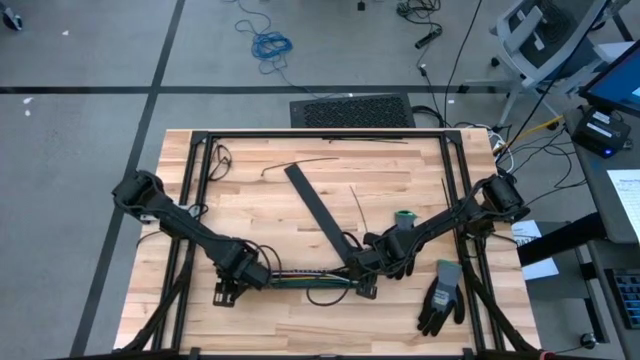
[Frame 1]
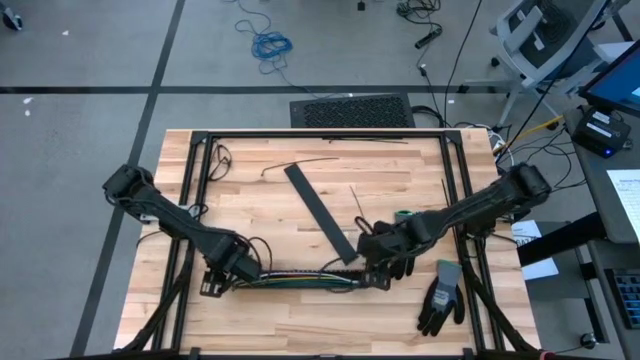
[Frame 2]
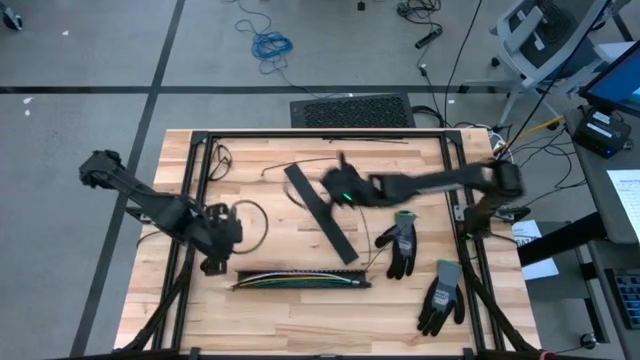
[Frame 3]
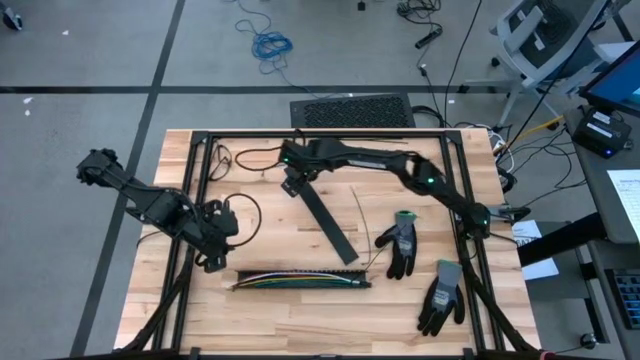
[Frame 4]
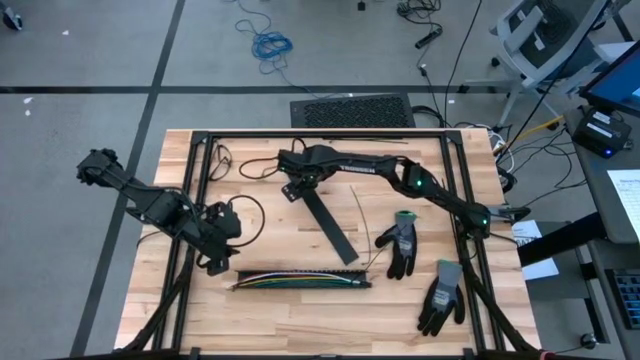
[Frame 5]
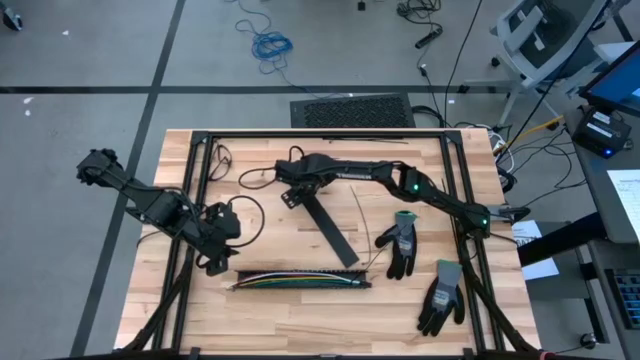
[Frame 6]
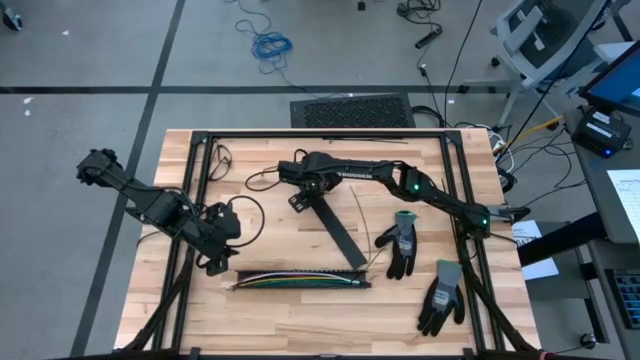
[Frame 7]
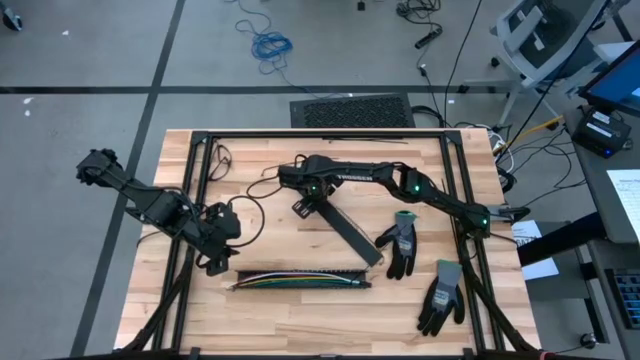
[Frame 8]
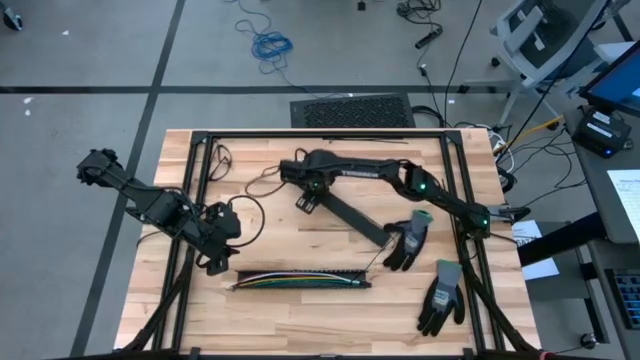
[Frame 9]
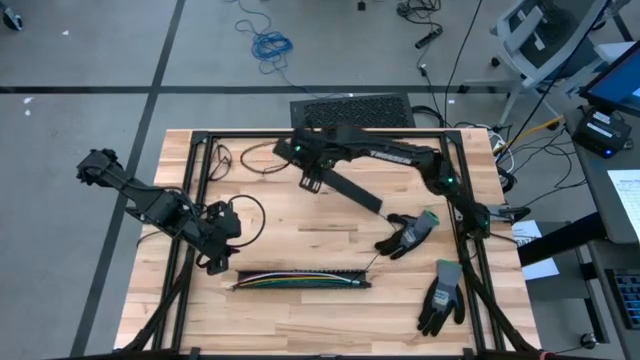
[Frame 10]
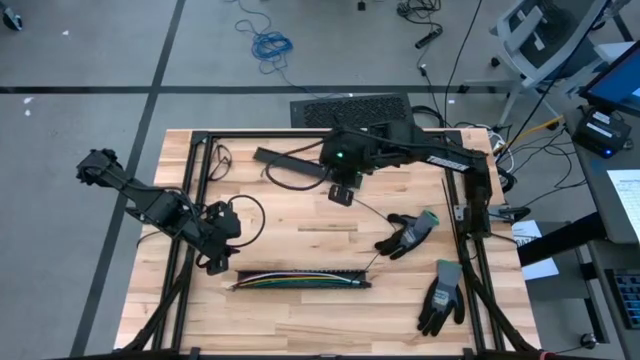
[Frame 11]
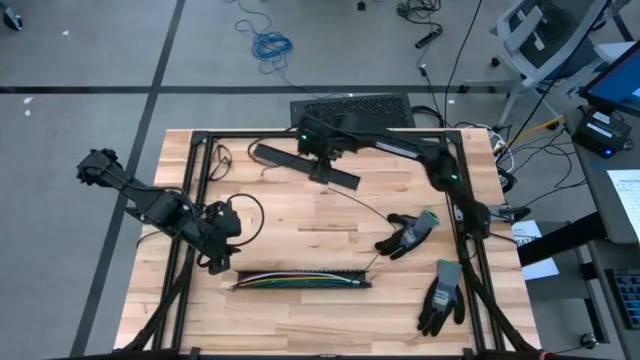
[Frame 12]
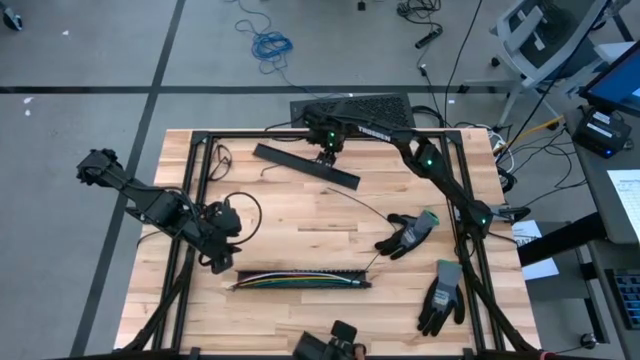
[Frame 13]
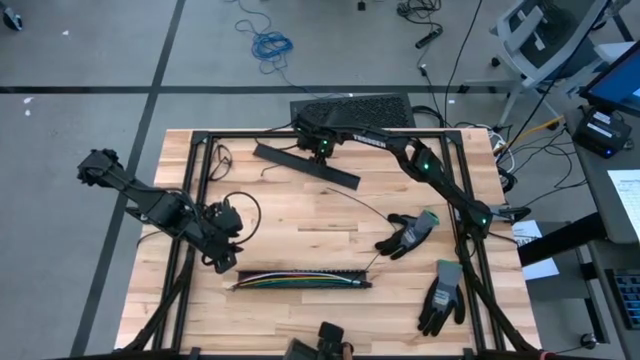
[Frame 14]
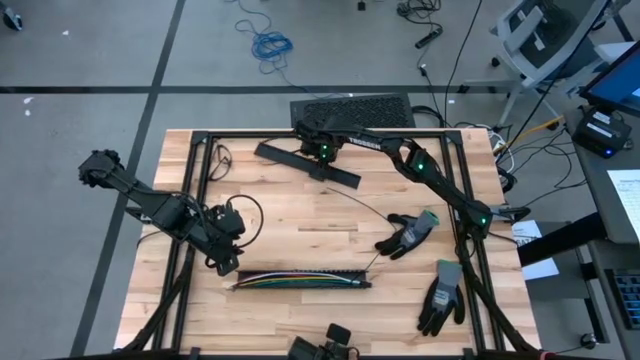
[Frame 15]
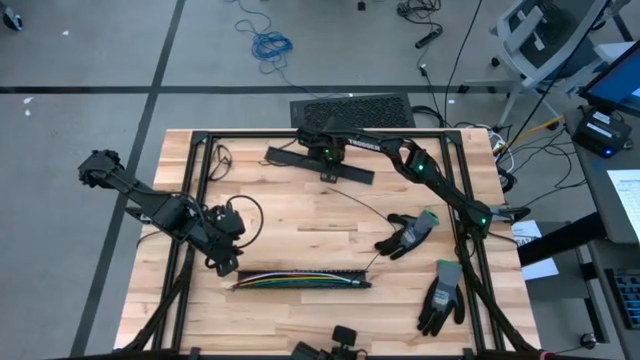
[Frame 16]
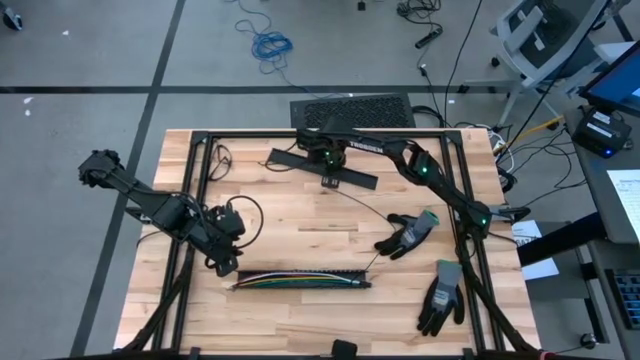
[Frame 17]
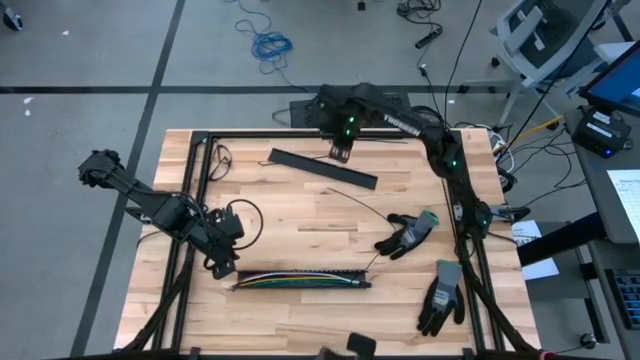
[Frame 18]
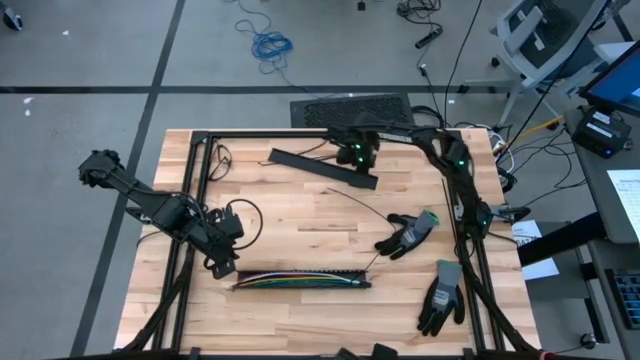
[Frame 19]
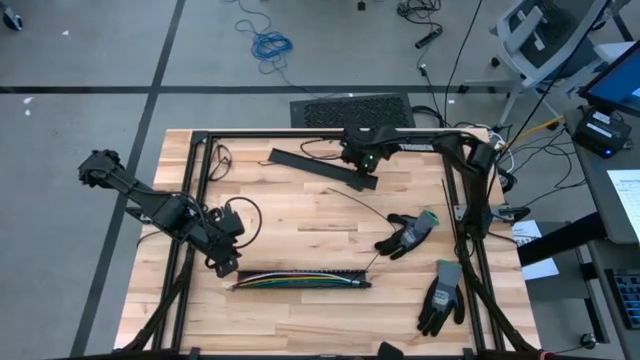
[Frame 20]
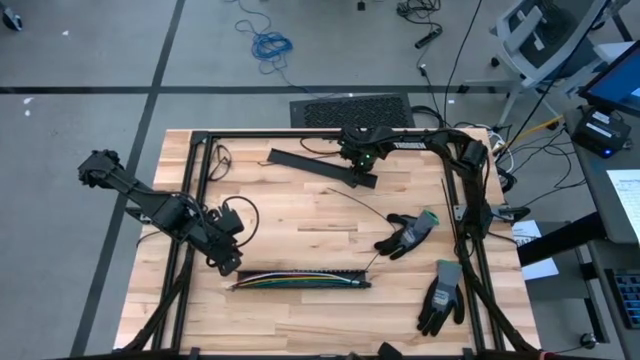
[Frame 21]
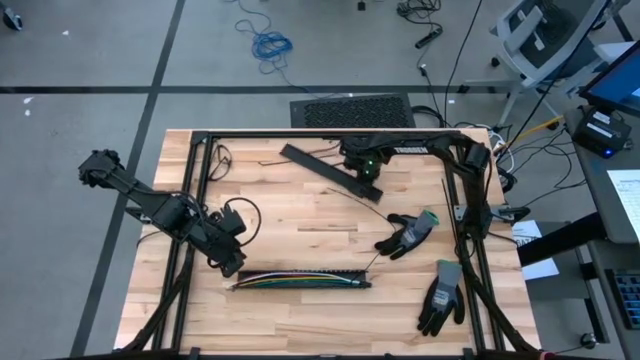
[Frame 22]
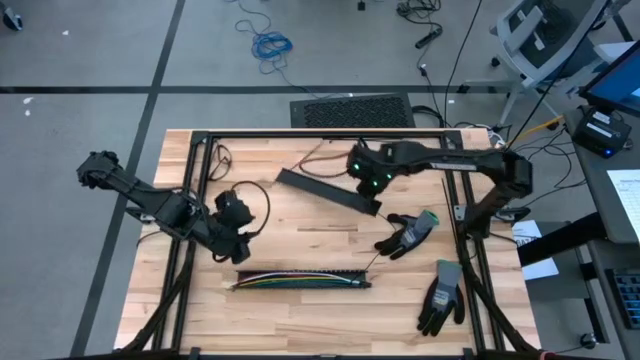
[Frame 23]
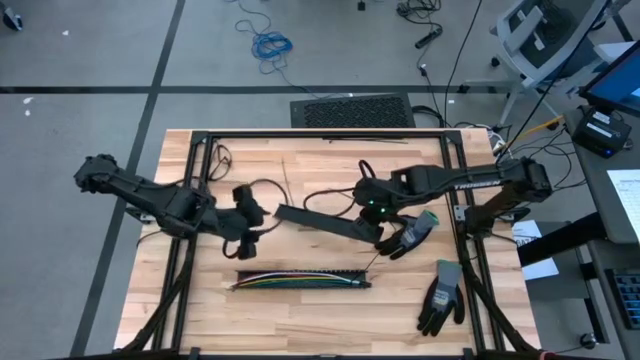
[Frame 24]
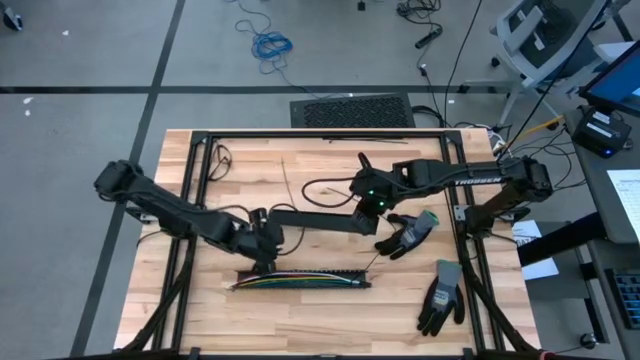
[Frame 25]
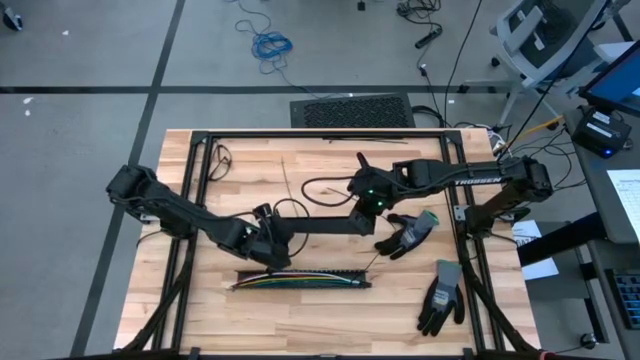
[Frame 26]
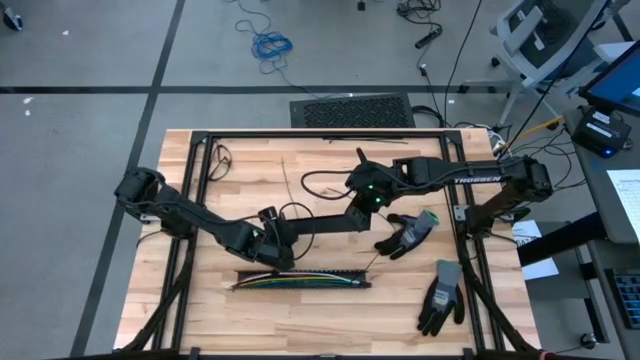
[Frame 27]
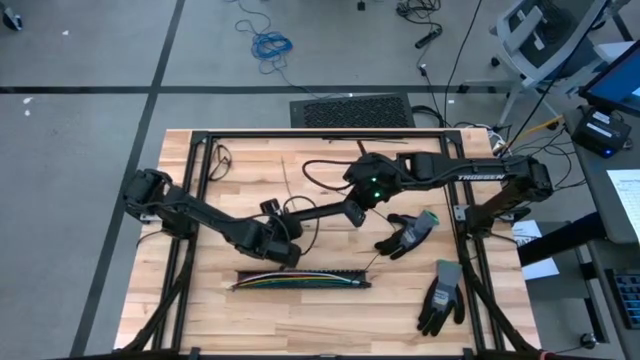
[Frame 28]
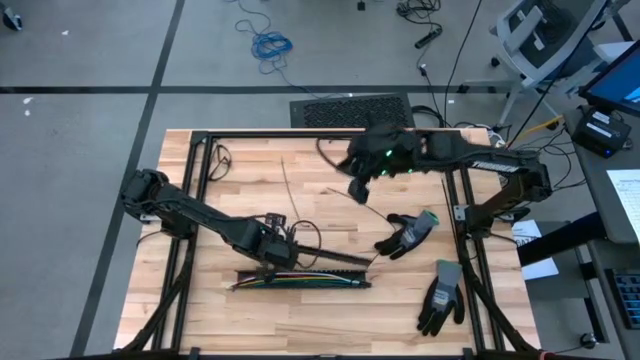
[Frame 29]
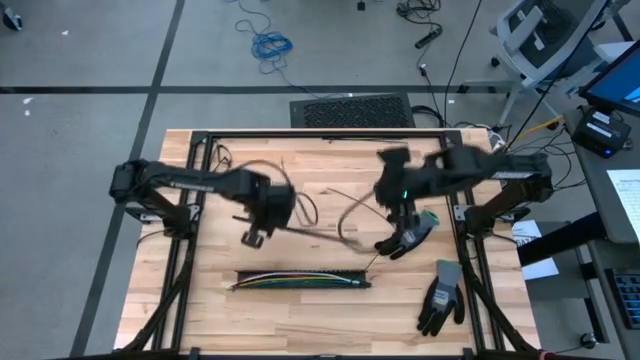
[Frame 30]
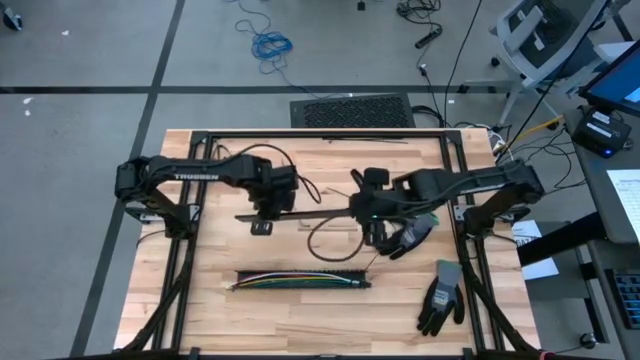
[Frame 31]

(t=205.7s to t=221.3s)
Task: Ziptie cables
Close the black cable duct

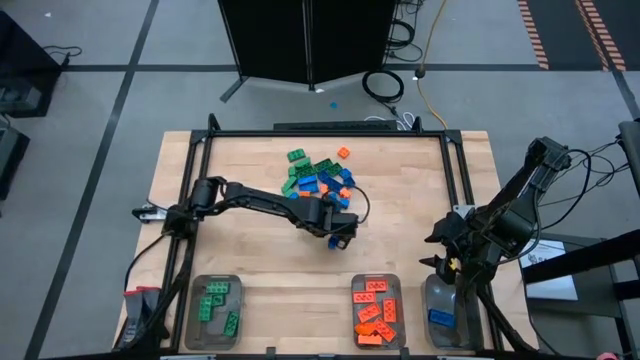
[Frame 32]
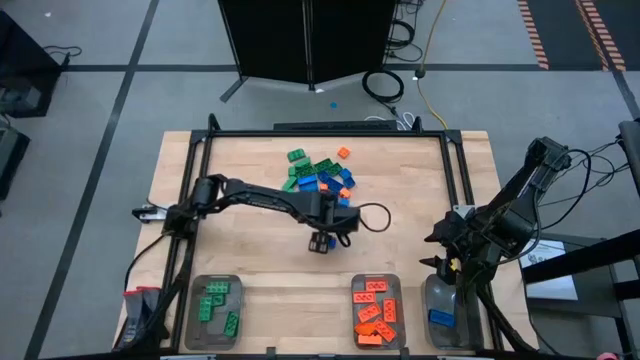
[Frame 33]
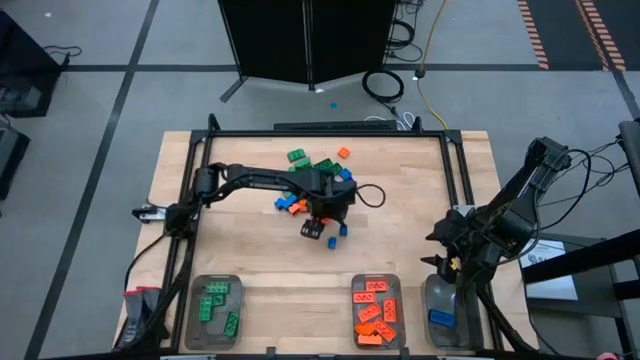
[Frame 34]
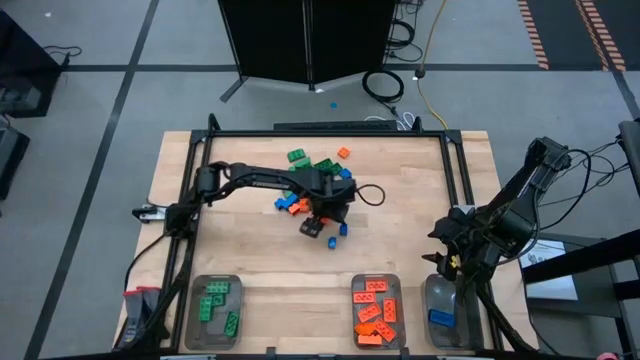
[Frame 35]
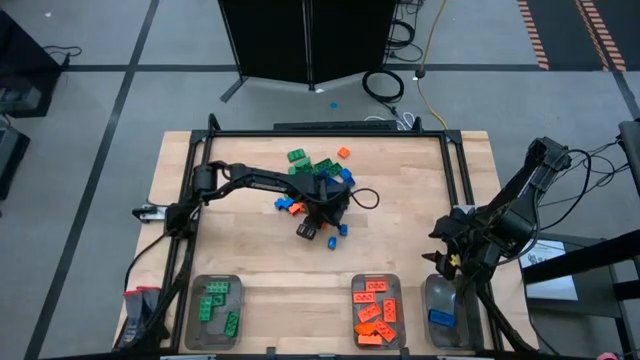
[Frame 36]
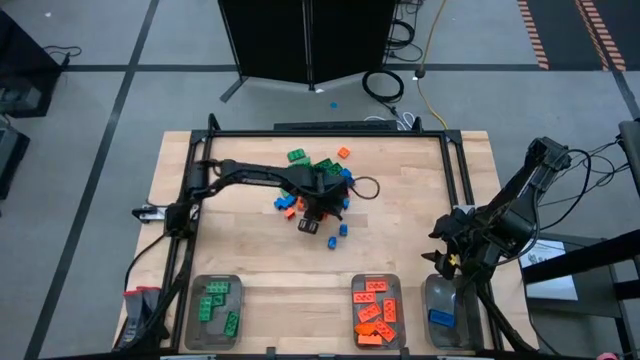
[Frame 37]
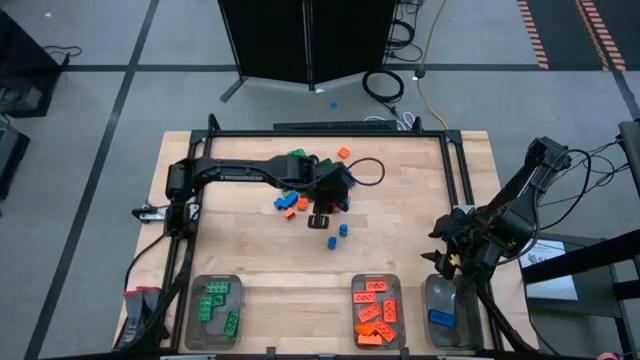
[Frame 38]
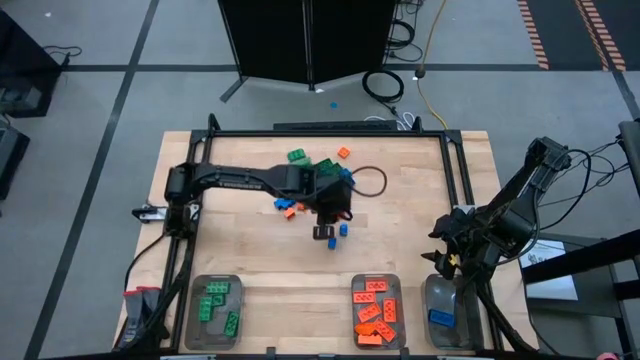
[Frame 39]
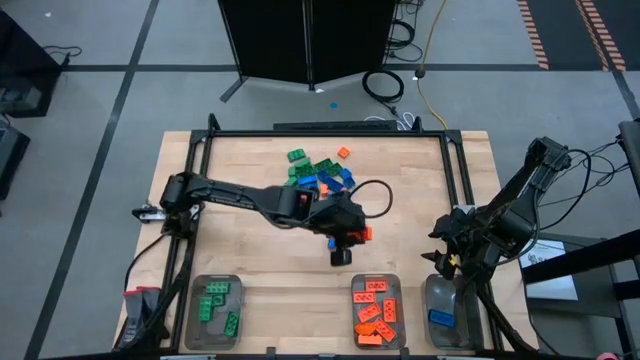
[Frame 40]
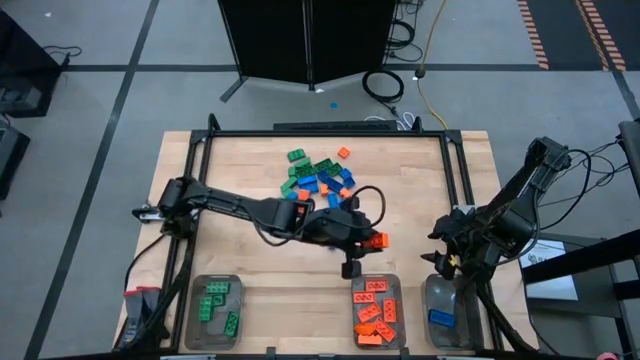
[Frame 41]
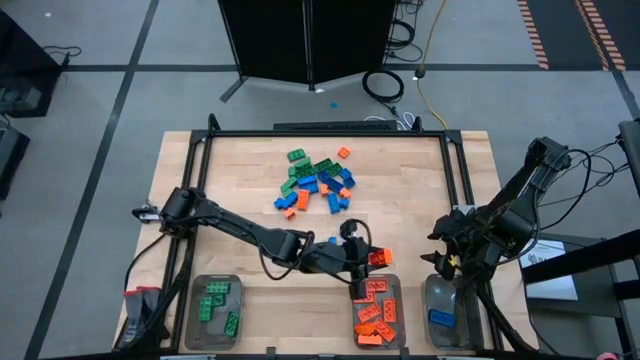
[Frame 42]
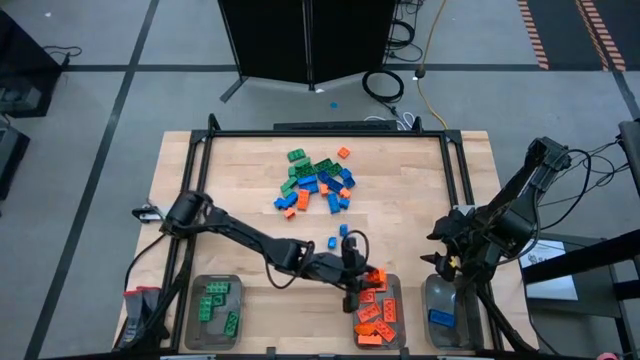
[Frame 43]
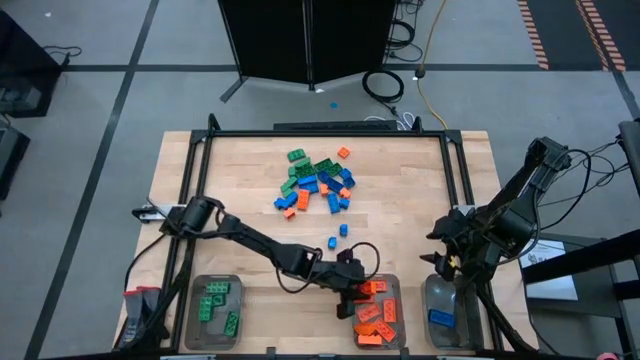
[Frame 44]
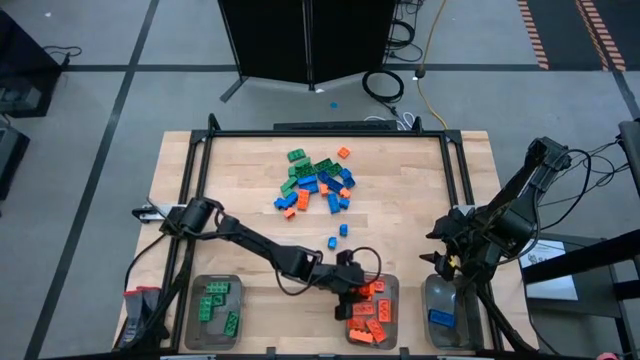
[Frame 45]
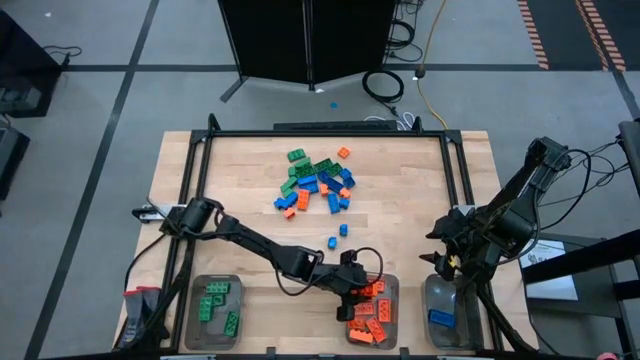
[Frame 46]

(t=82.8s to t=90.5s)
Task: Sort blocks
Put the orange game piece into the center black bin
